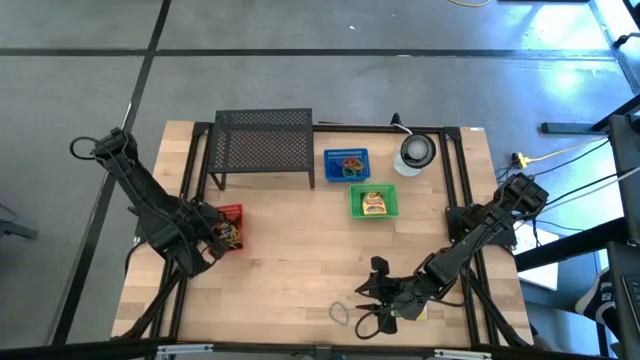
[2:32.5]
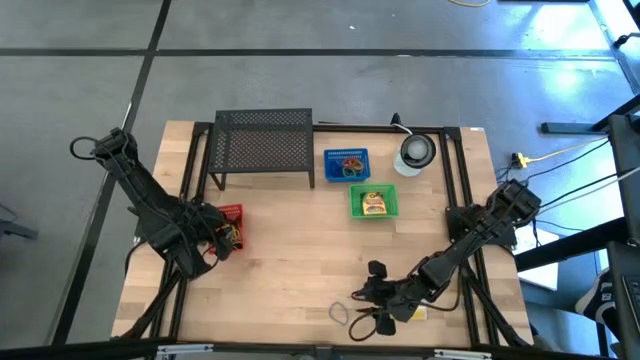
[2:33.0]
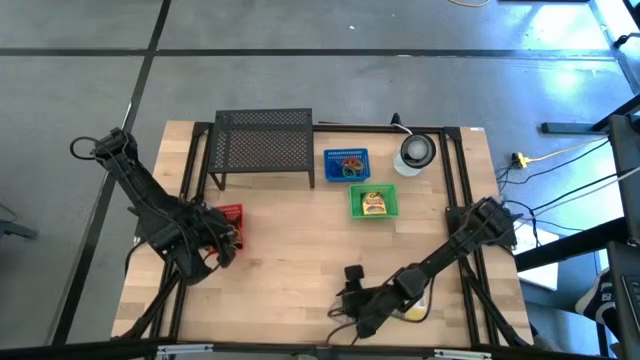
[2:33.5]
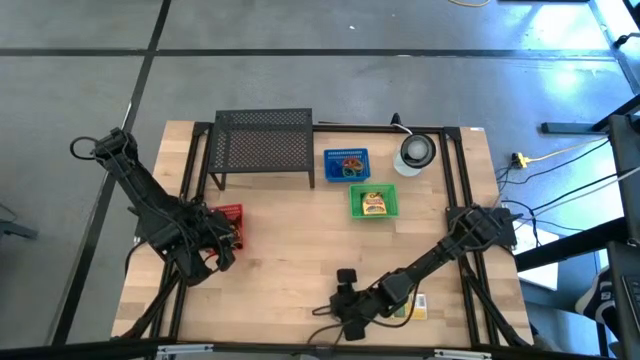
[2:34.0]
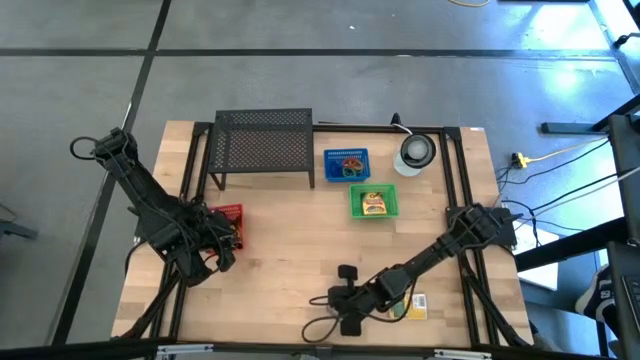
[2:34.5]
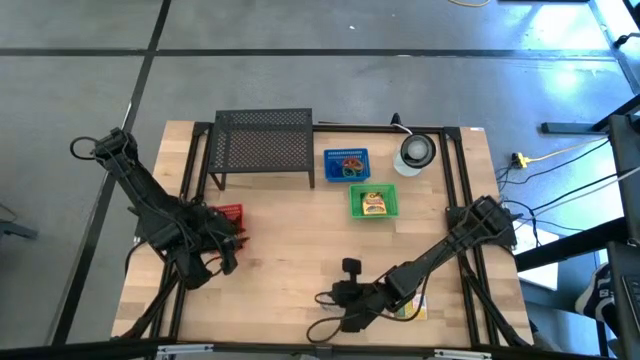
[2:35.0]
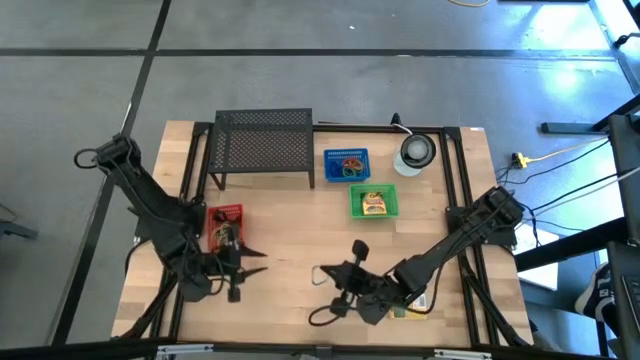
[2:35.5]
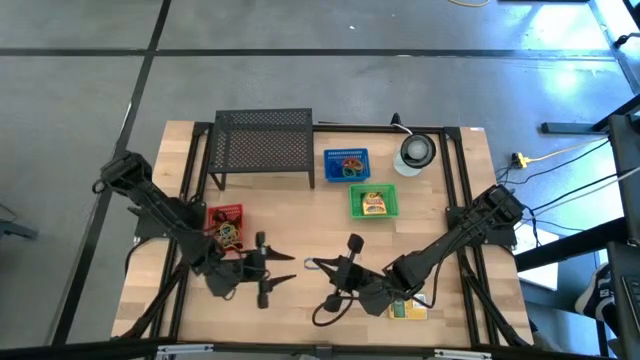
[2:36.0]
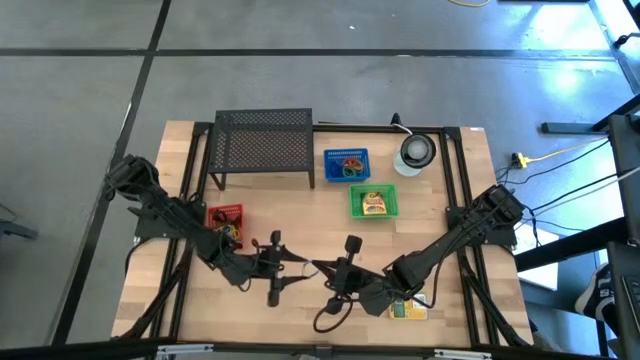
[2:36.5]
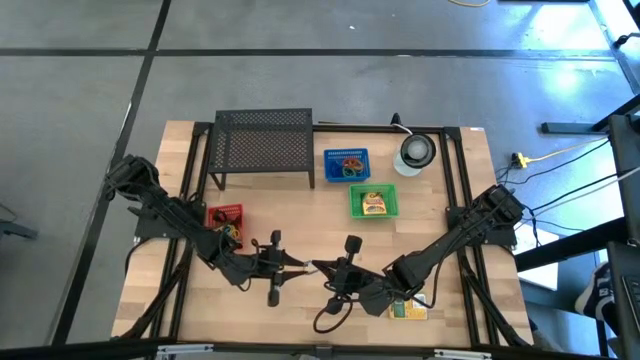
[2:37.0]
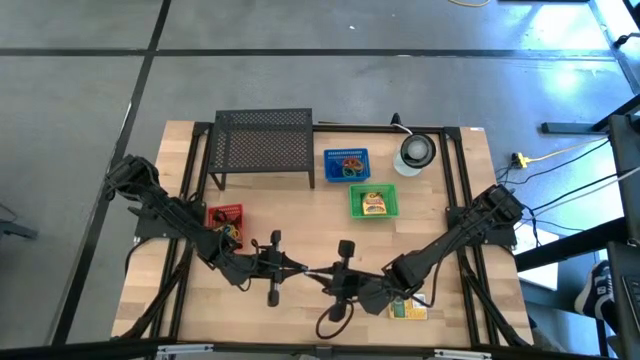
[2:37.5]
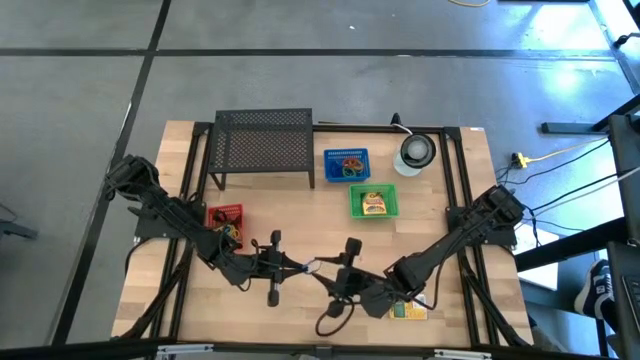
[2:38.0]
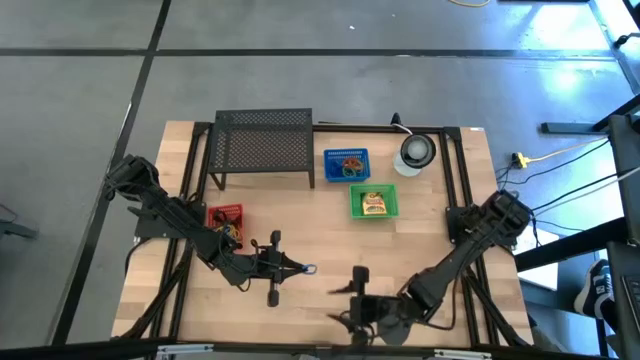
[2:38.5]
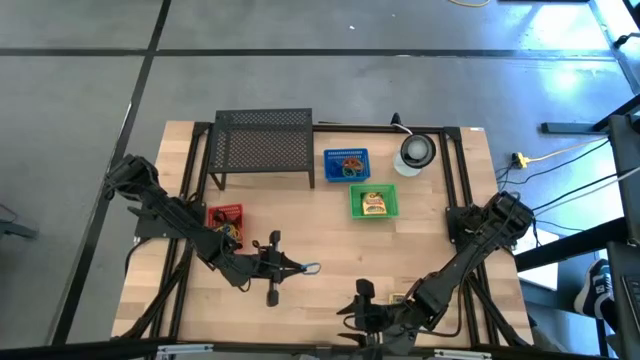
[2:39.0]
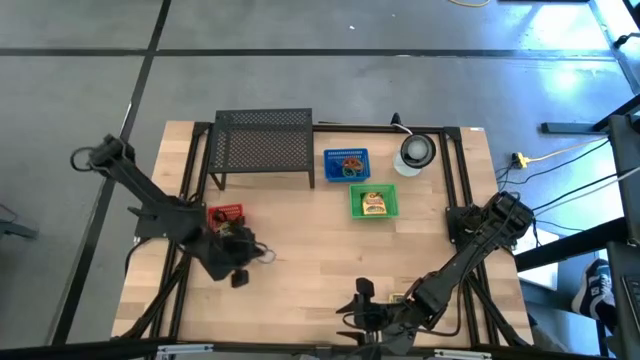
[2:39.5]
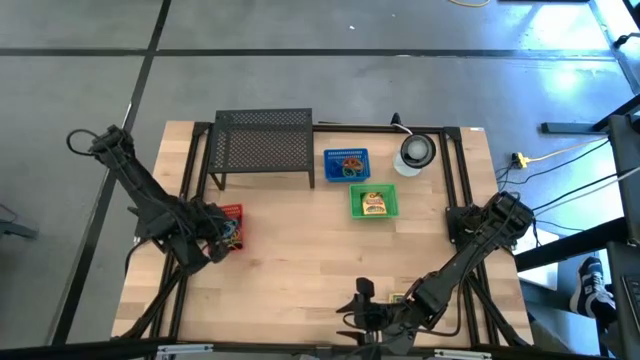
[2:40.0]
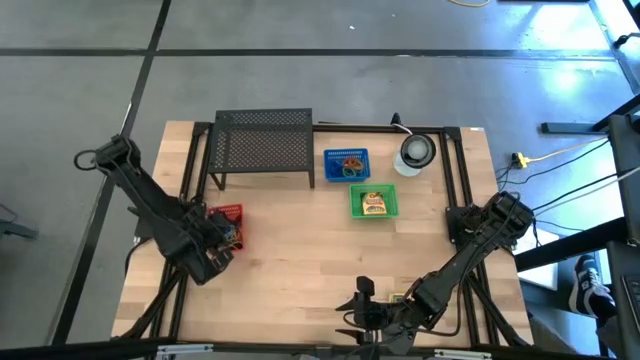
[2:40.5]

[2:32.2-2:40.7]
Task: Pick & Place Office Desk Supplies
Put the blue rubber band into the orange basket

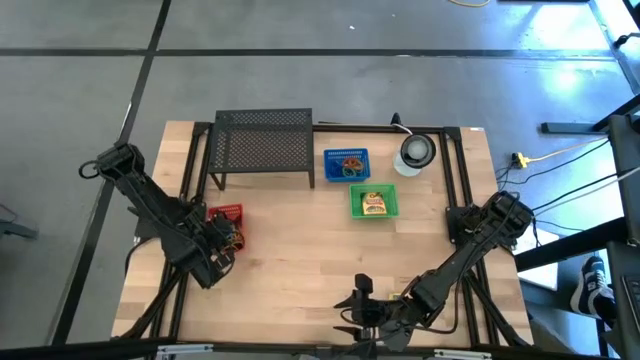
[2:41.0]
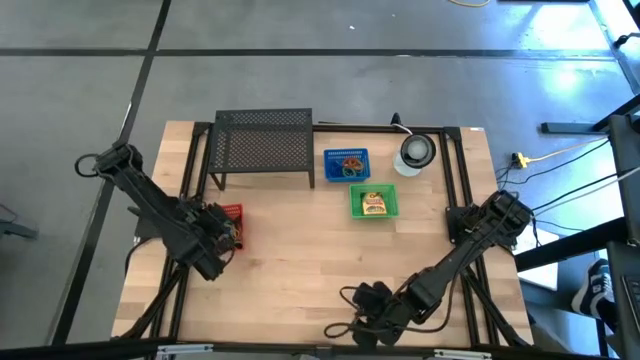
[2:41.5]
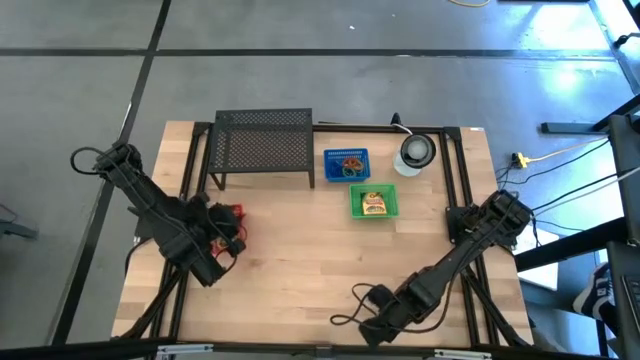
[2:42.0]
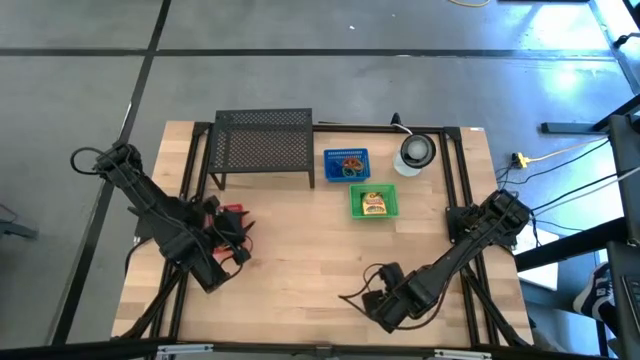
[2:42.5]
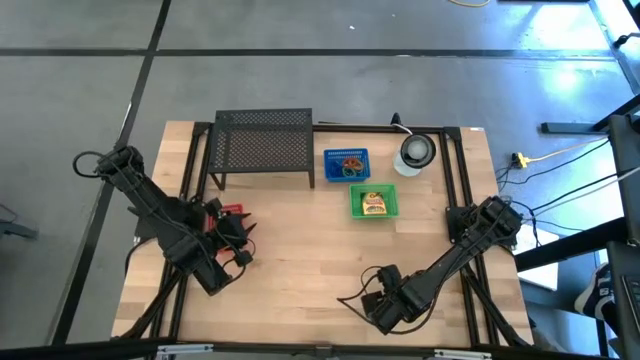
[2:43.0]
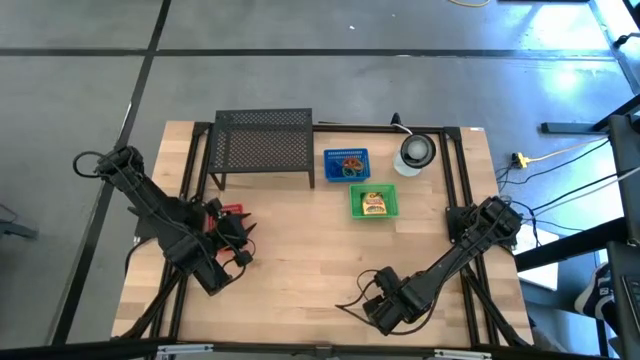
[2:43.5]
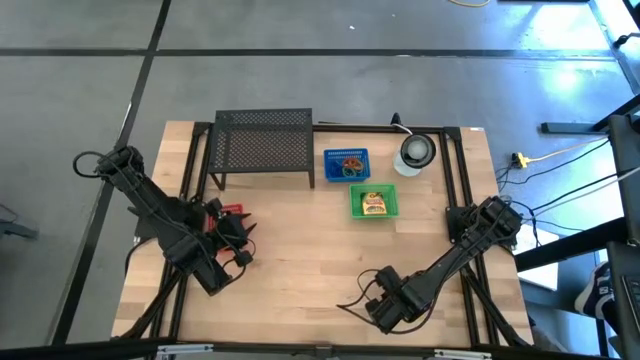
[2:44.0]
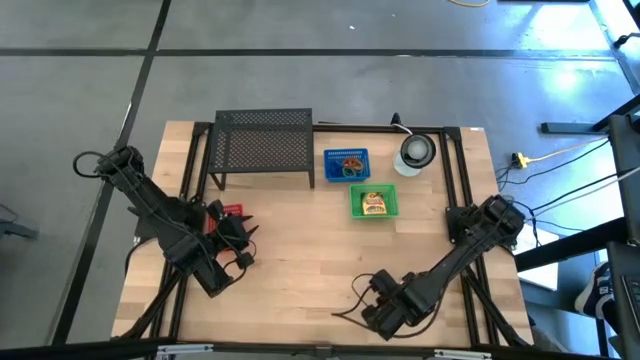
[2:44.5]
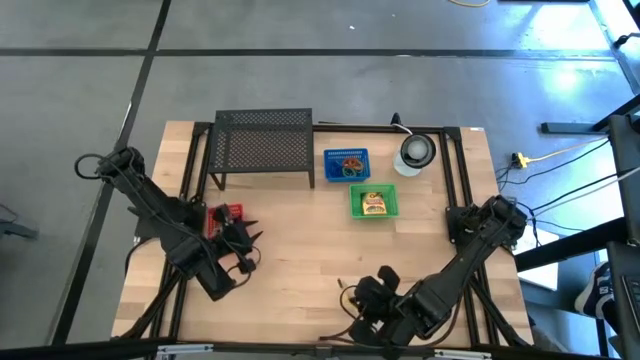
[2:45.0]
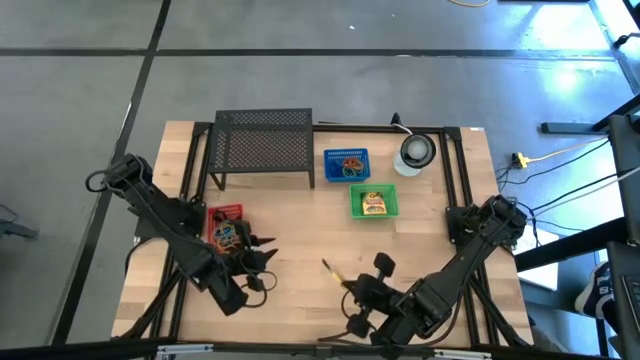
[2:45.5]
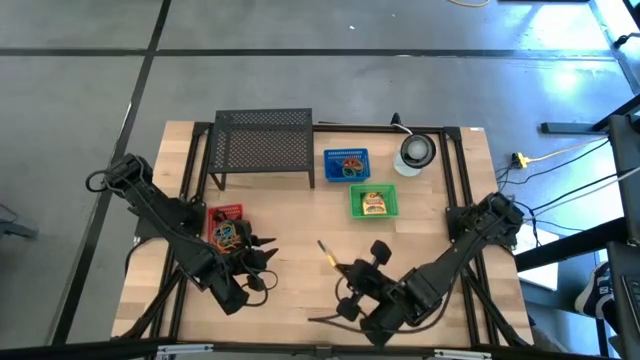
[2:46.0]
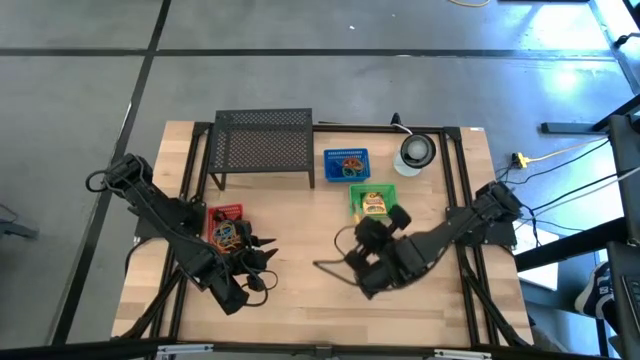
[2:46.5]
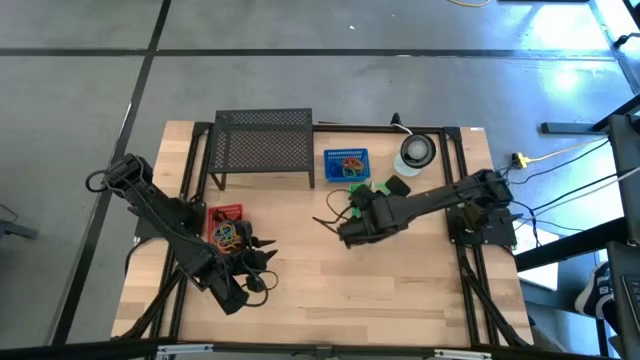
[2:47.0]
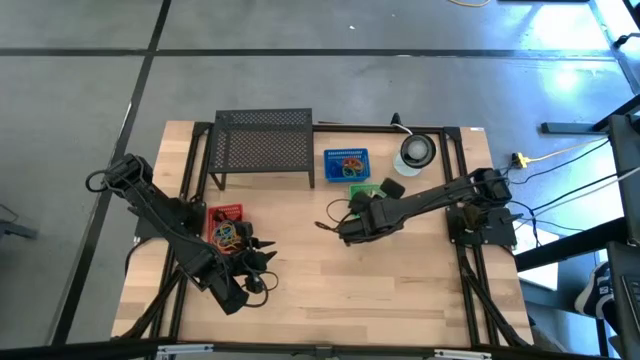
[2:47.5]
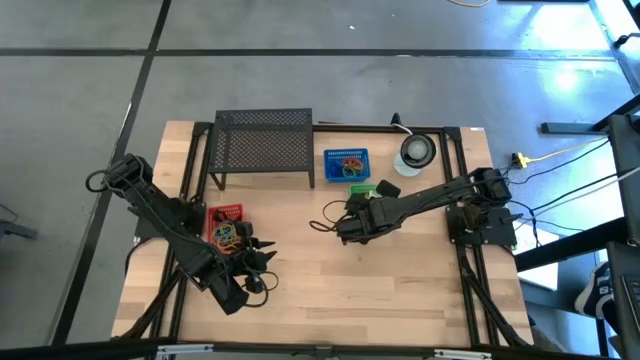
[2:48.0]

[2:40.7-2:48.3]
Put the crayon box into the green basket

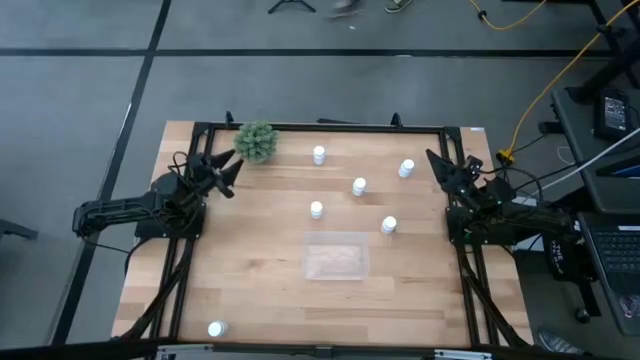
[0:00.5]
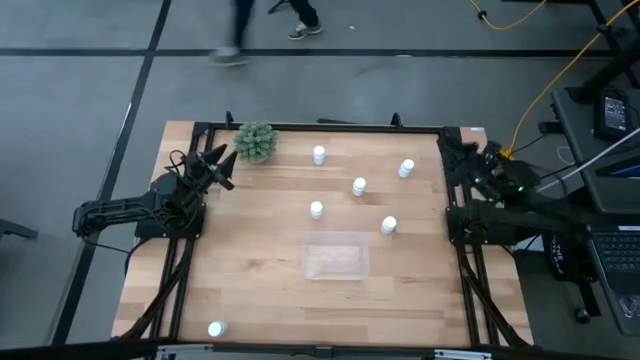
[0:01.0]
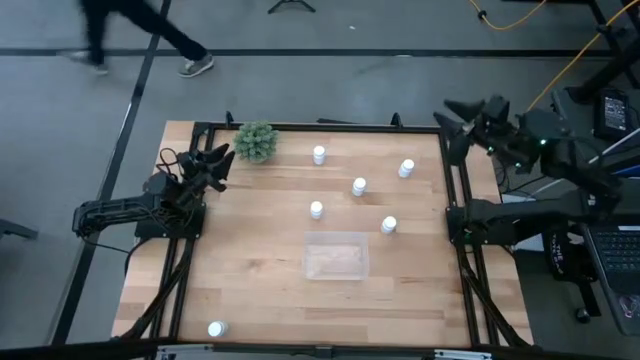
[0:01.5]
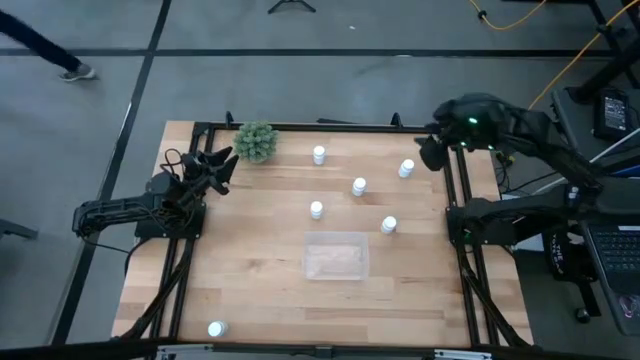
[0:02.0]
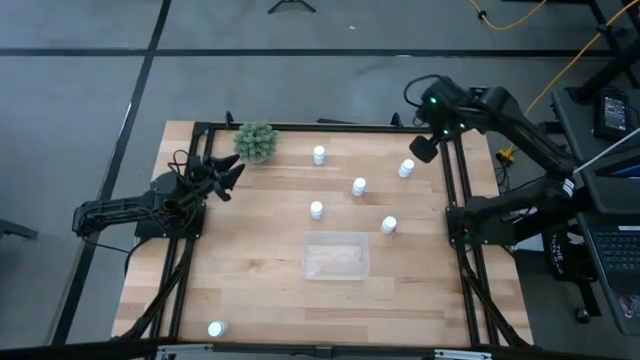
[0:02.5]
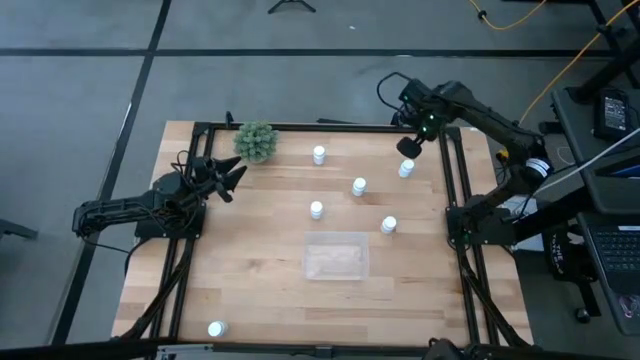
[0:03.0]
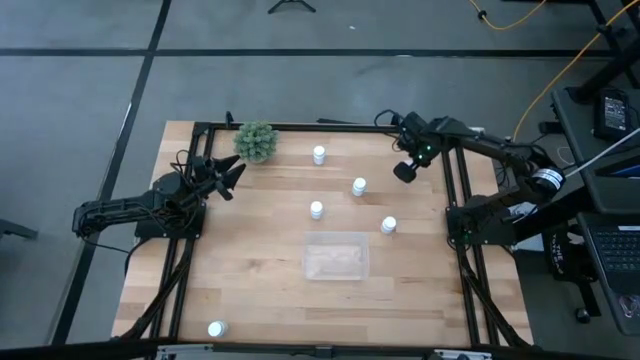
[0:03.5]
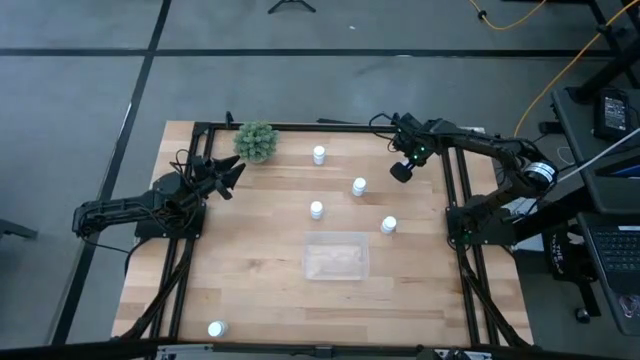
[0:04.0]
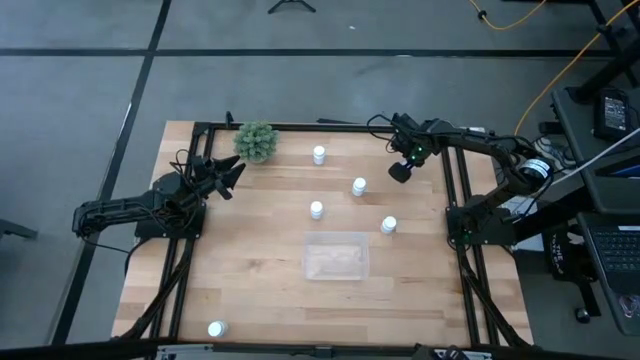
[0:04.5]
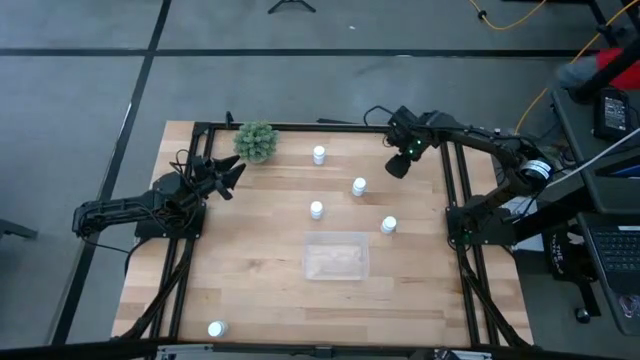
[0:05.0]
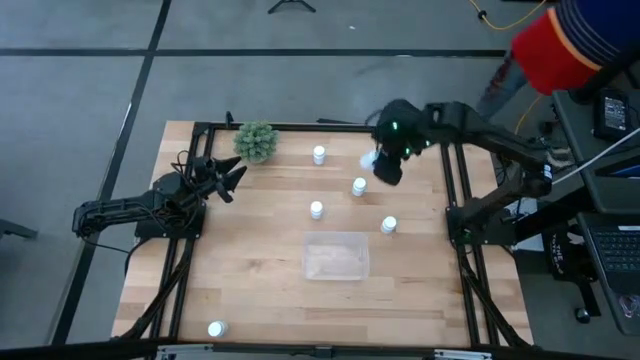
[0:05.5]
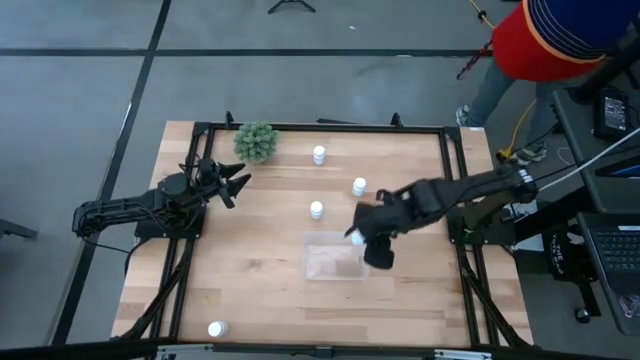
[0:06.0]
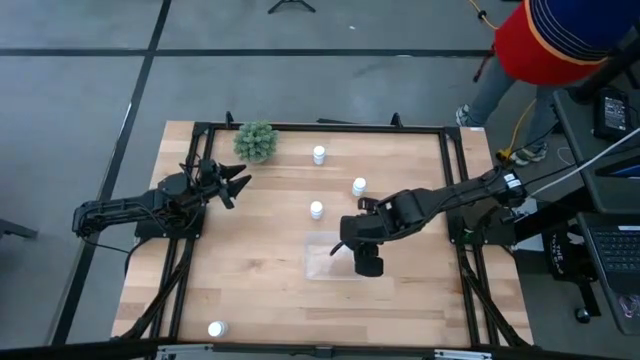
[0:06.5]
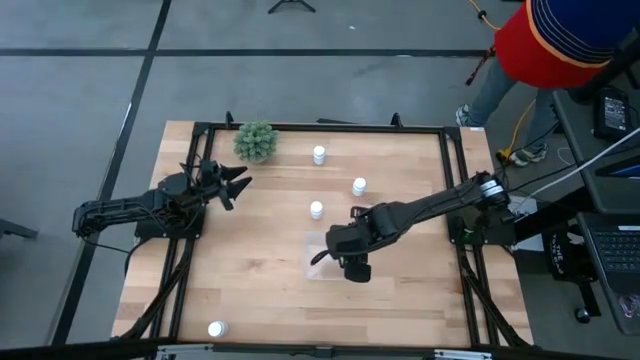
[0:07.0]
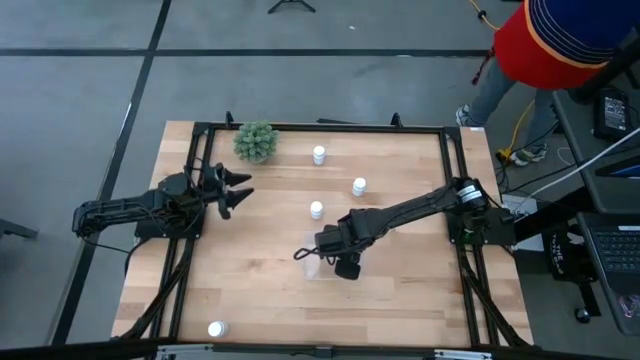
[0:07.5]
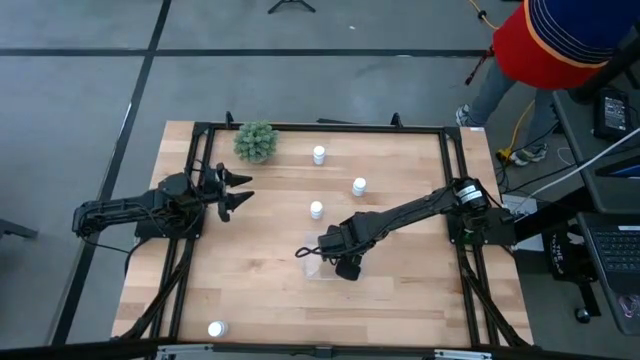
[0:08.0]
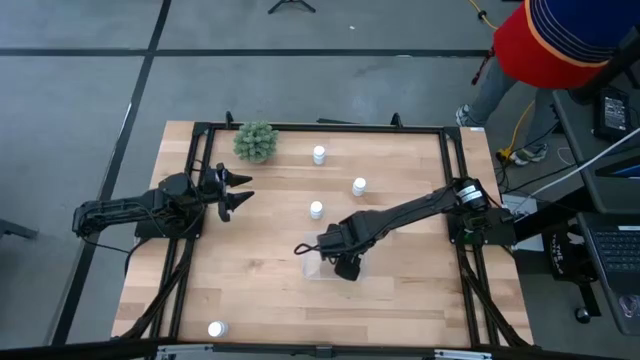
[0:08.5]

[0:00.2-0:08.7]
Task: Pick and place pill bottles into a basket
Put the white medicine bottle into the transparent bin
